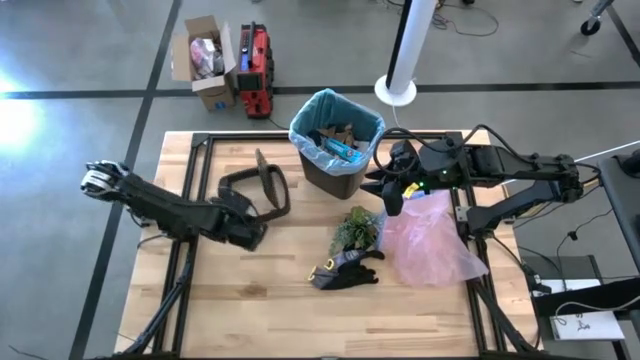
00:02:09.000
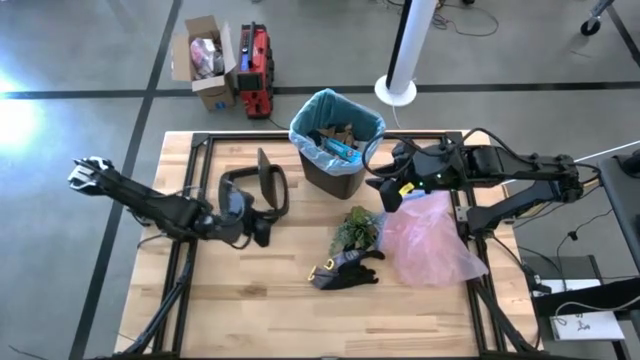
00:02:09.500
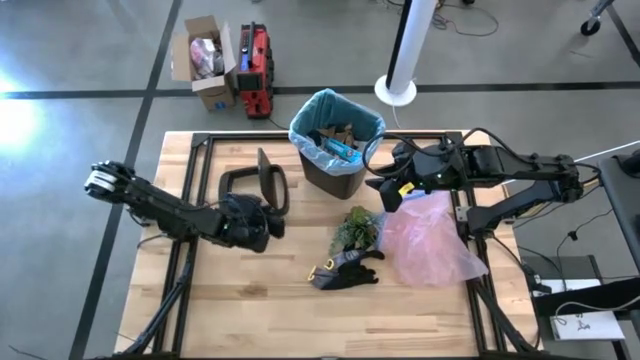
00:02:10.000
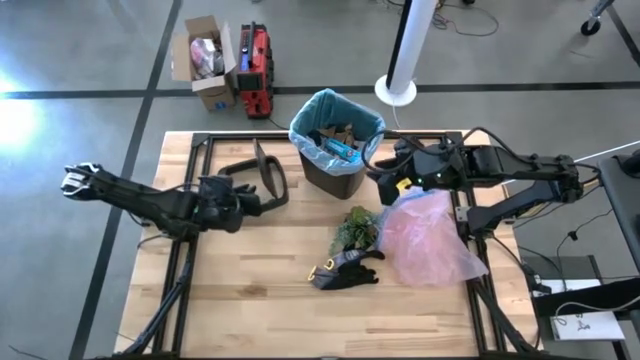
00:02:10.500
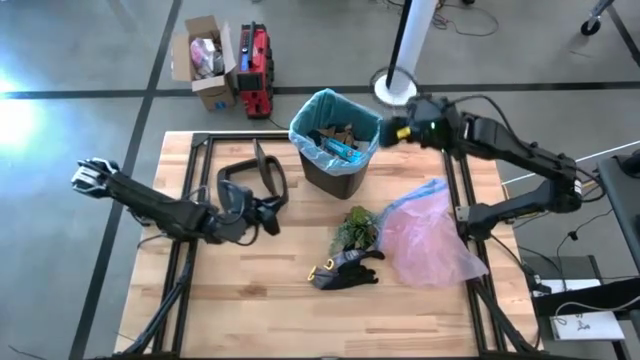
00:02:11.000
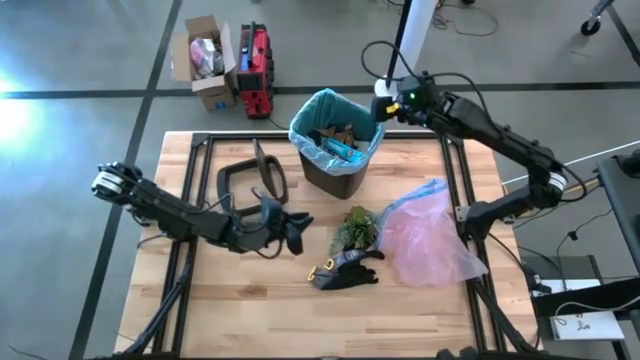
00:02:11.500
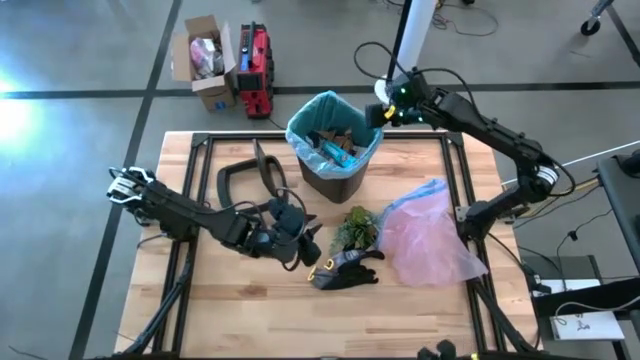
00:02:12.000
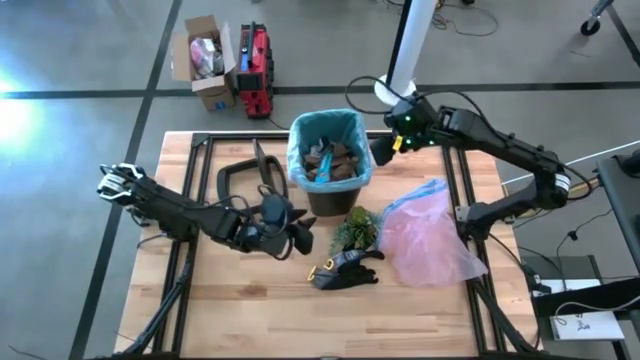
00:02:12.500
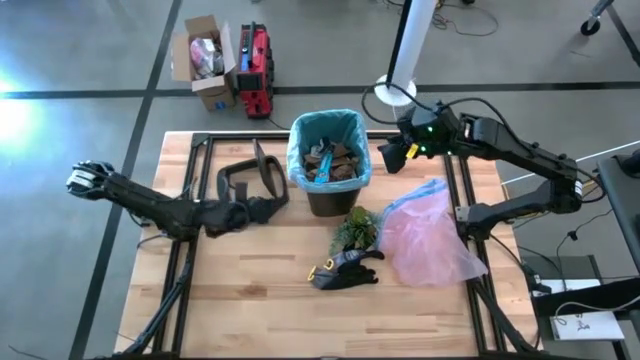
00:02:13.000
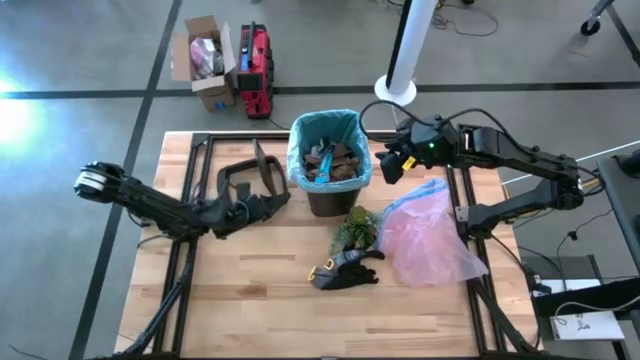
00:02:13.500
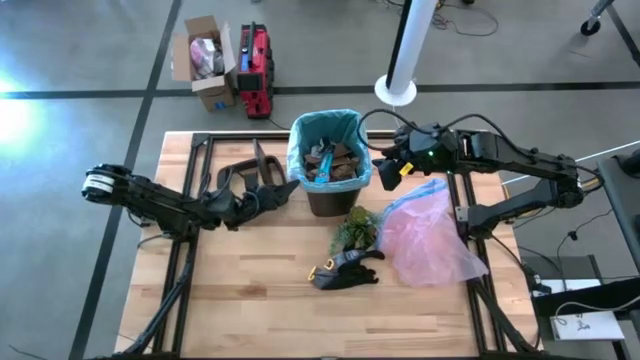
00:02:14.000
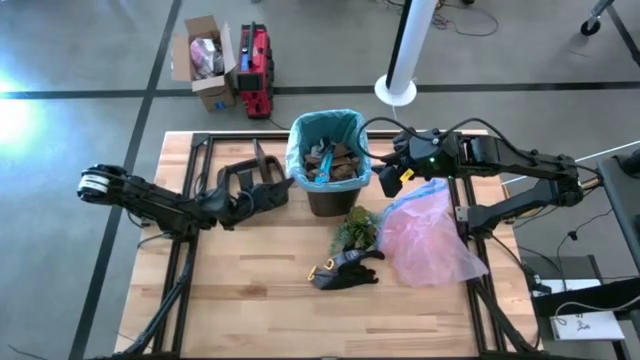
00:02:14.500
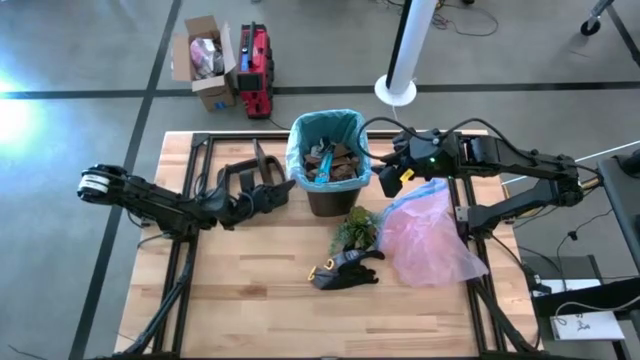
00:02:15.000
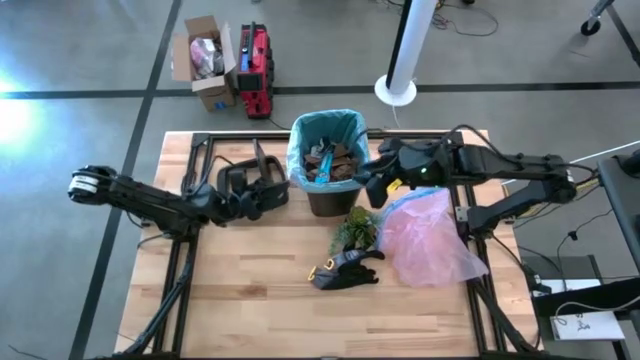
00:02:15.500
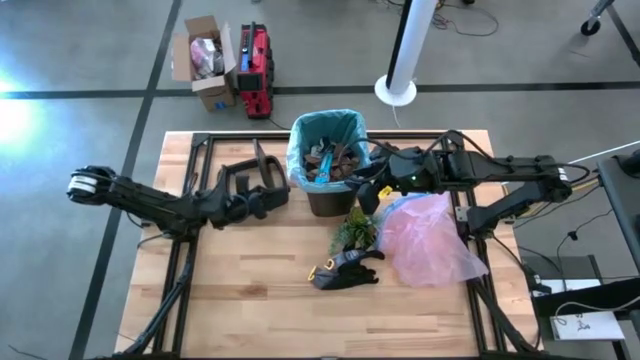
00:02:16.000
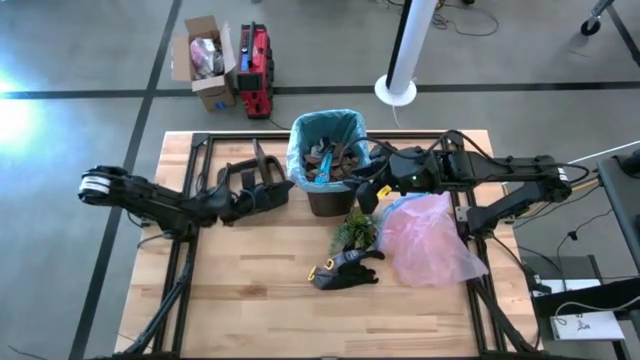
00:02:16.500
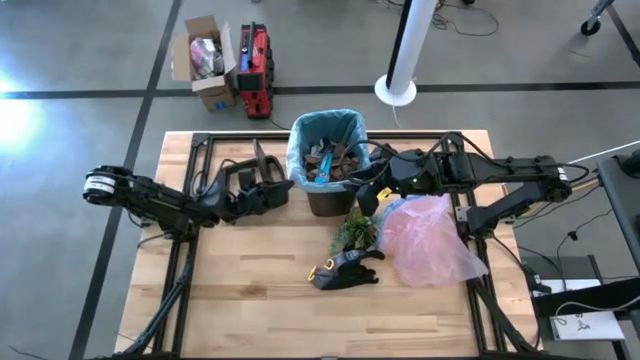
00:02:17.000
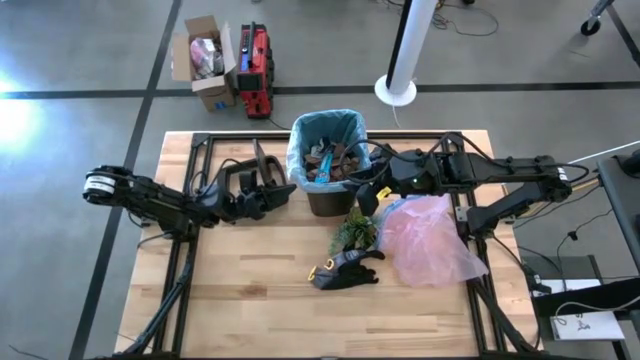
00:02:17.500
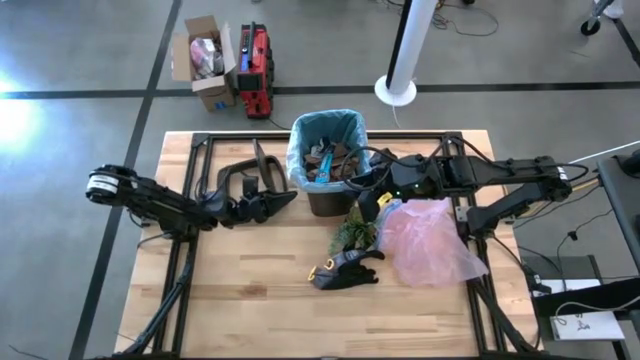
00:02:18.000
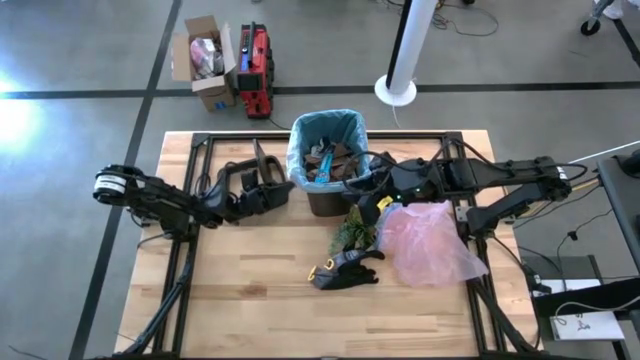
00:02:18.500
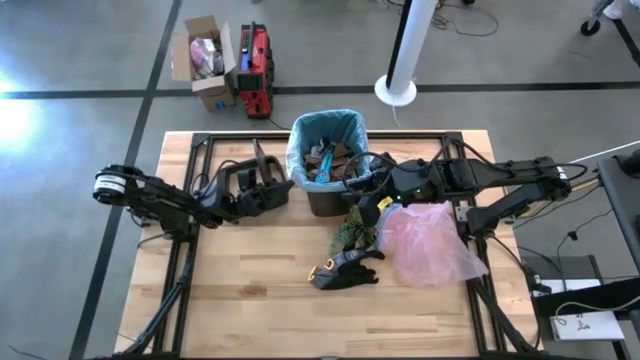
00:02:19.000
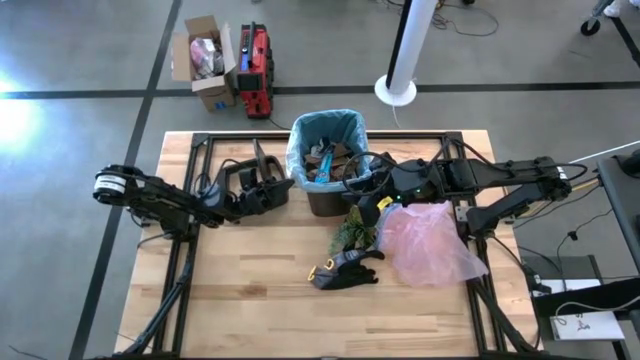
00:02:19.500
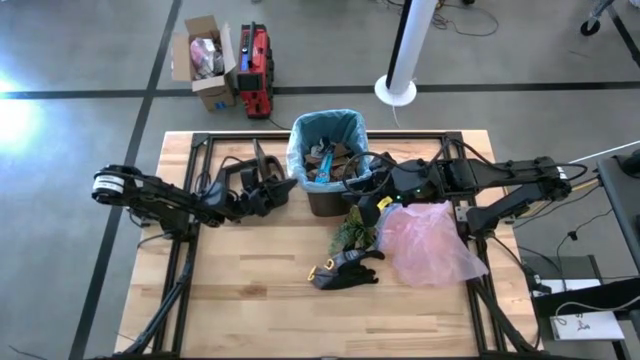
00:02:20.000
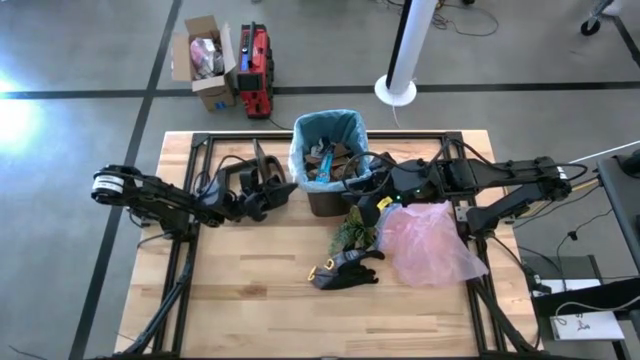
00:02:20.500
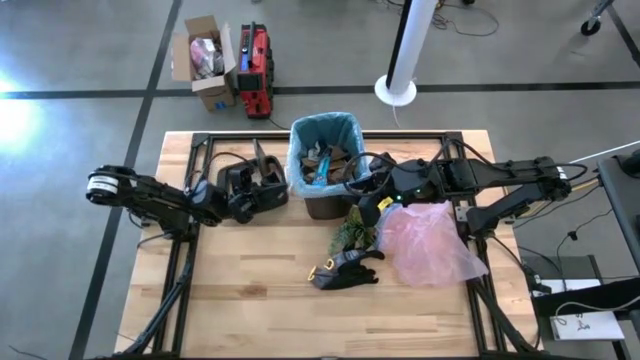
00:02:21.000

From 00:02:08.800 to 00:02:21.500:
Task: place trash/remove bag and relplace
Remove trash bag from trash bin

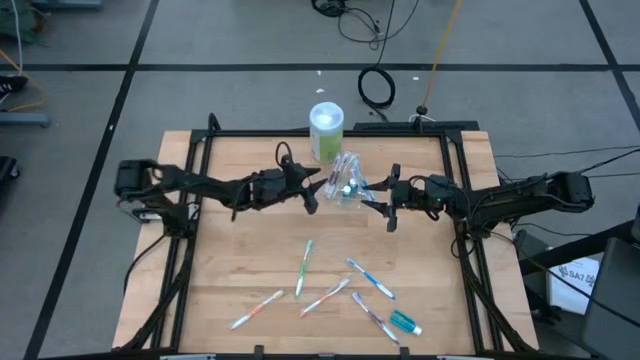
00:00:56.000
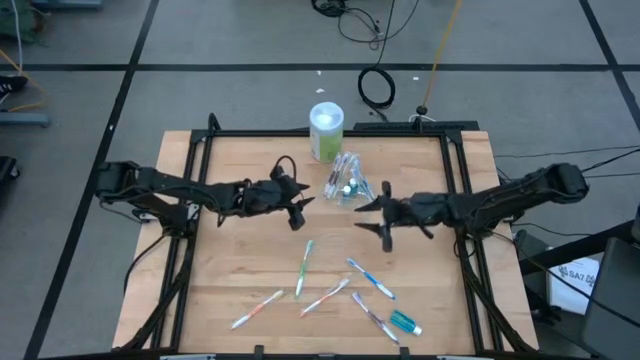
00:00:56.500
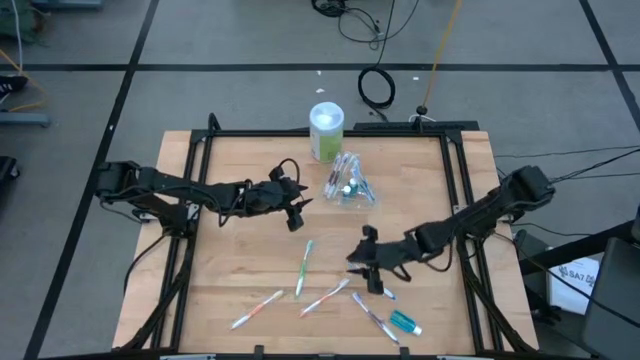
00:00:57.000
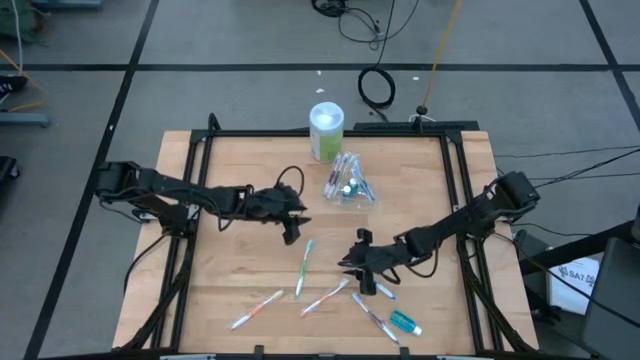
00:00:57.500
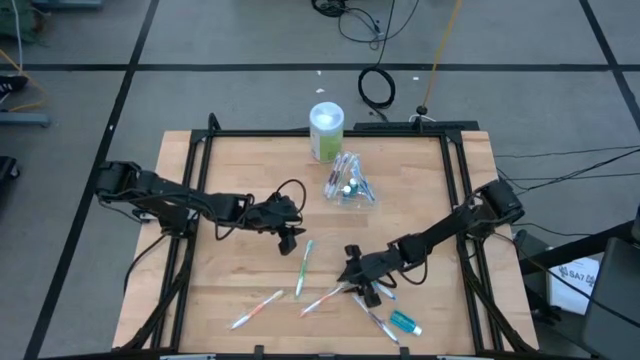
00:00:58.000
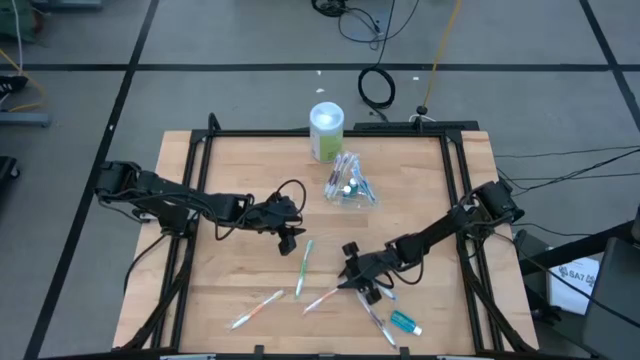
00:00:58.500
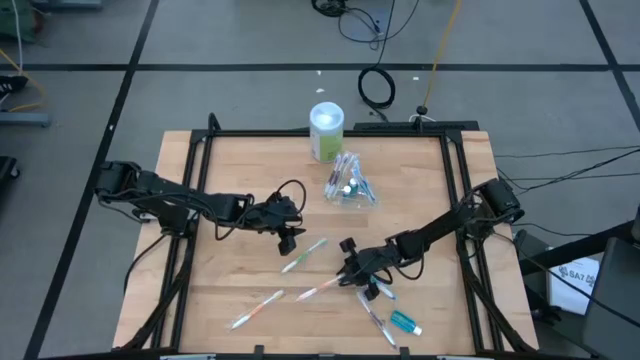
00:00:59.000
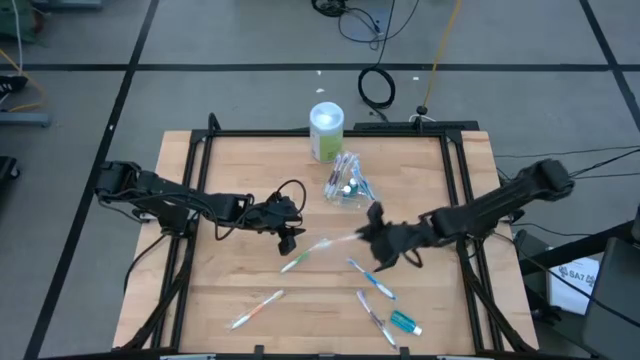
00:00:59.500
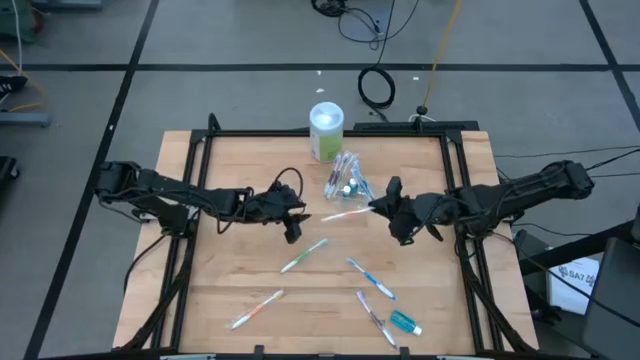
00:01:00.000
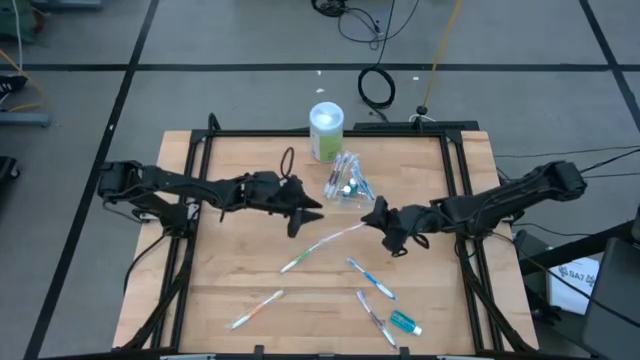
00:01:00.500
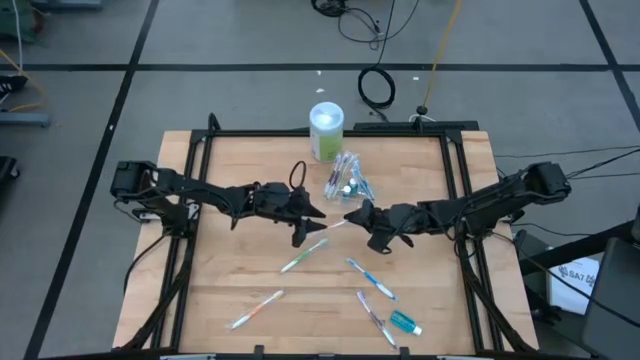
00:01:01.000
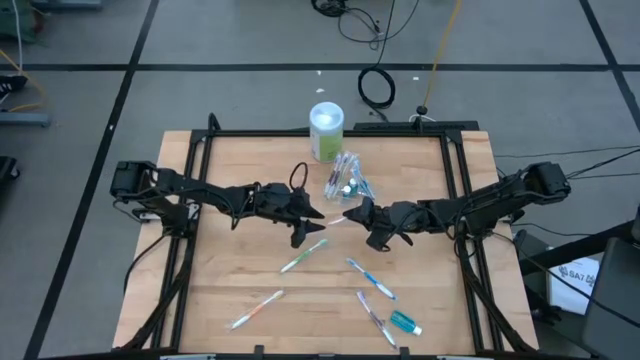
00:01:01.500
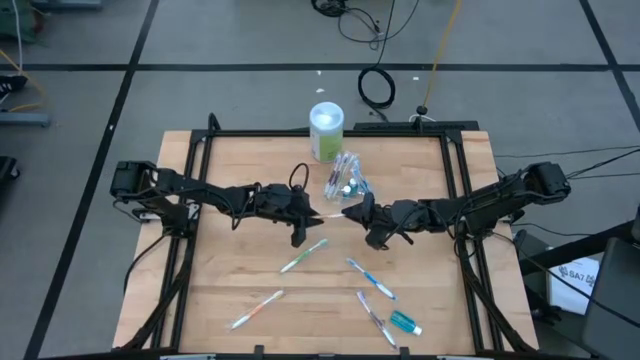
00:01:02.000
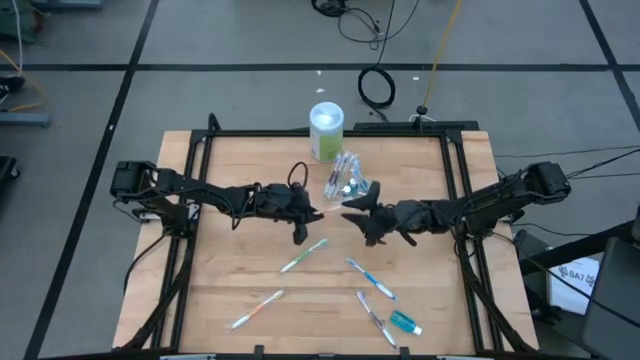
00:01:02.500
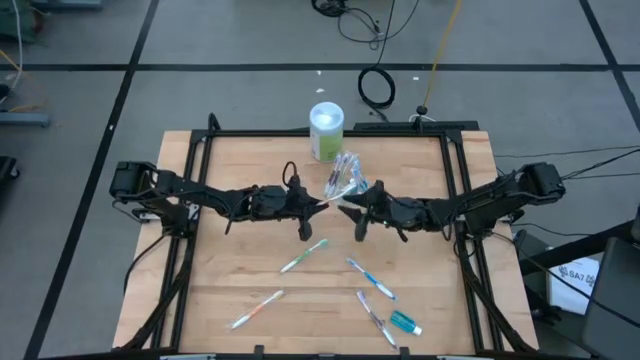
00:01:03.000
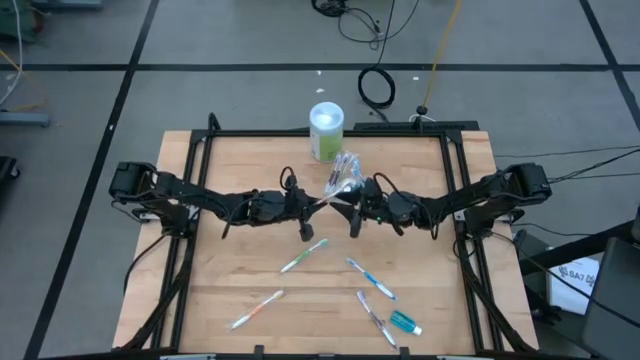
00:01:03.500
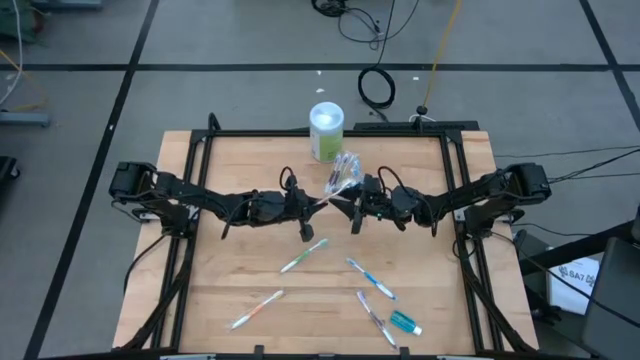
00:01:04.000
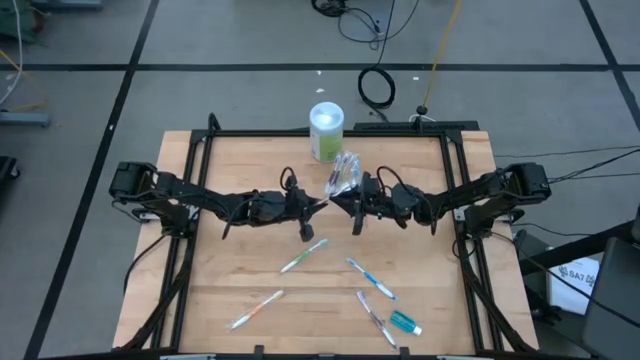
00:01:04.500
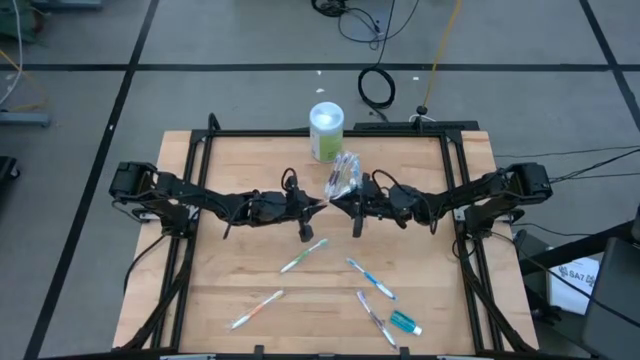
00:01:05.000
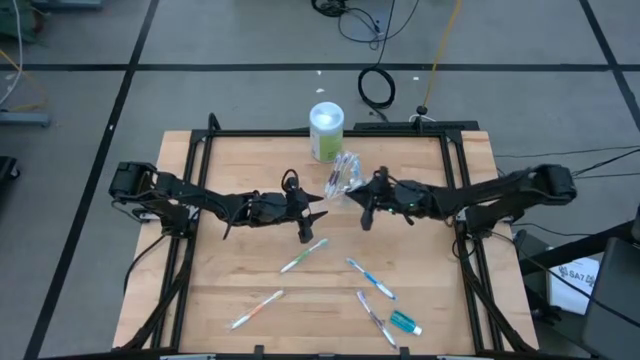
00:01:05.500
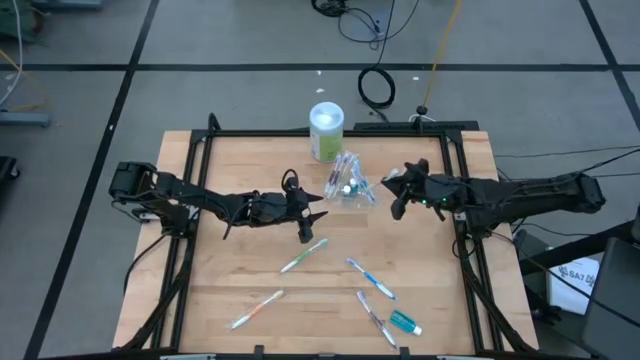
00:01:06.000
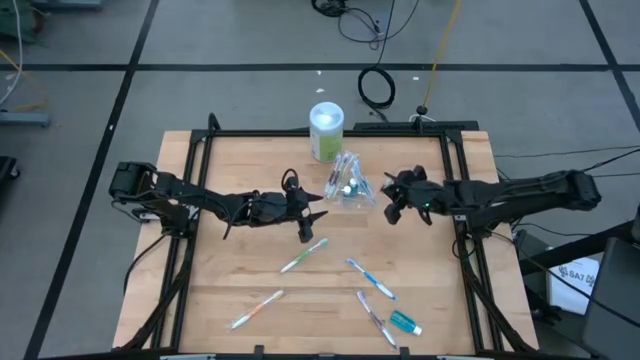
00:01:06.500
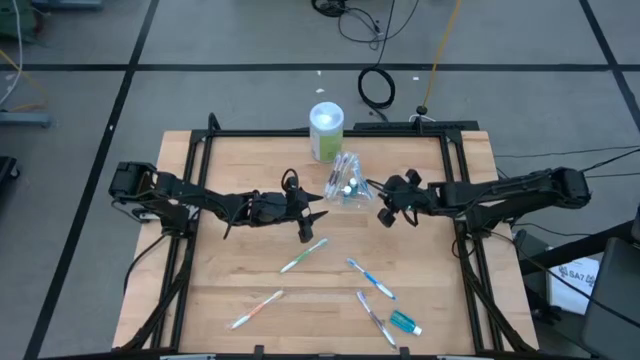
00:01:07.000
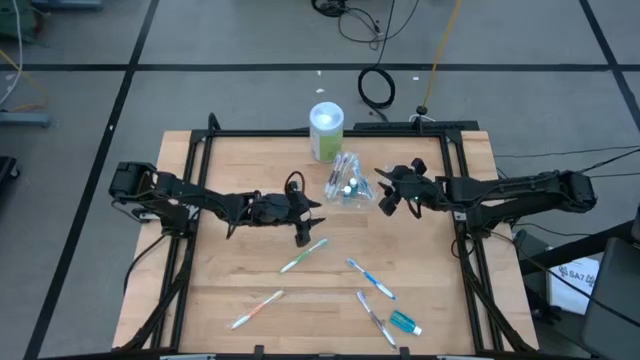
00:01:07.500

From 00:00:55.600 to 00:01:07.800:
Task: Pick & Place toothbrushing station
Put the right orange toothbrush into the transparent organizer
